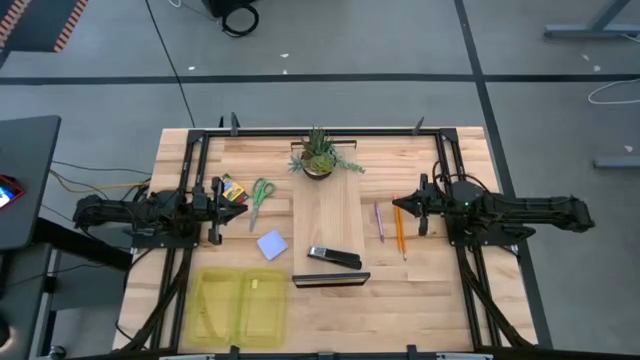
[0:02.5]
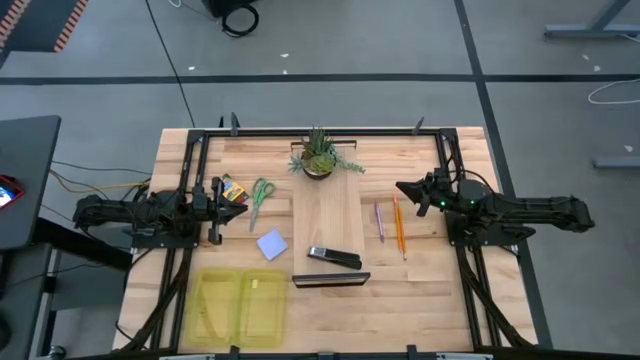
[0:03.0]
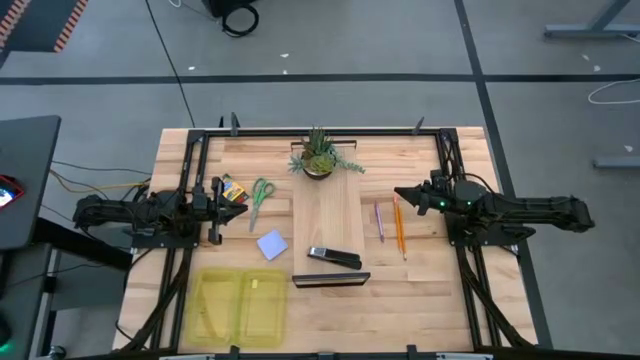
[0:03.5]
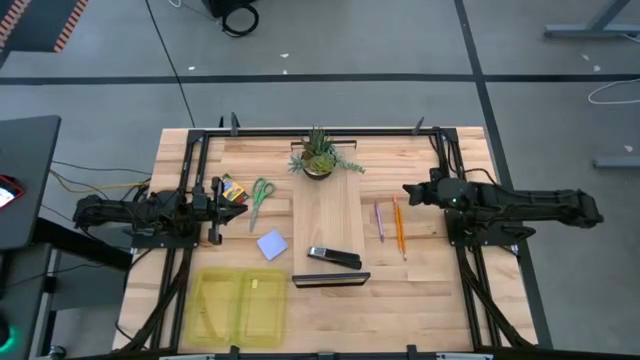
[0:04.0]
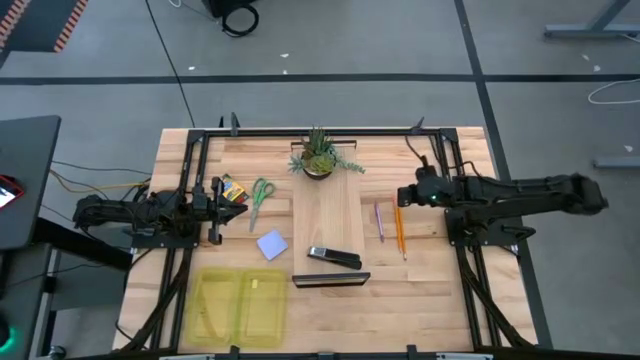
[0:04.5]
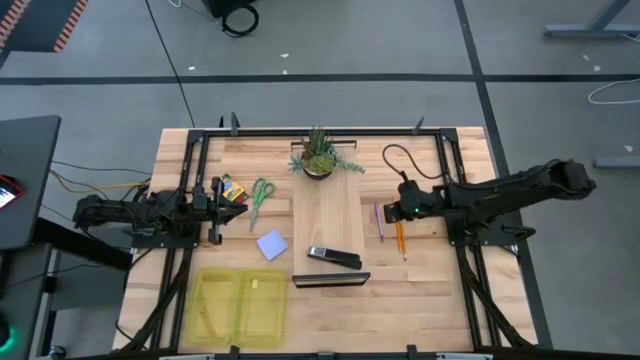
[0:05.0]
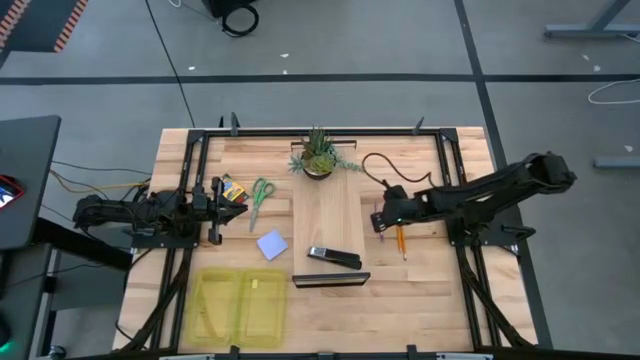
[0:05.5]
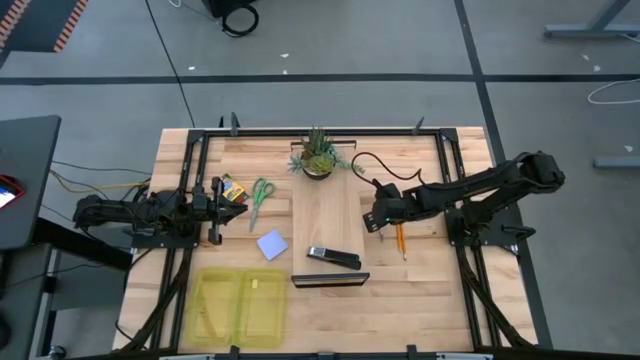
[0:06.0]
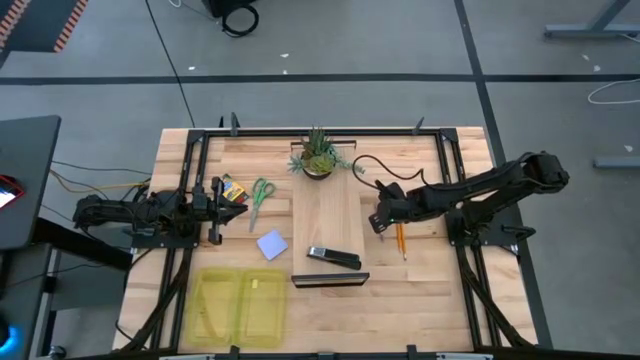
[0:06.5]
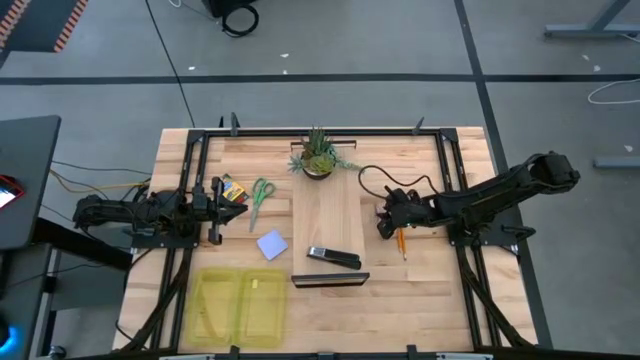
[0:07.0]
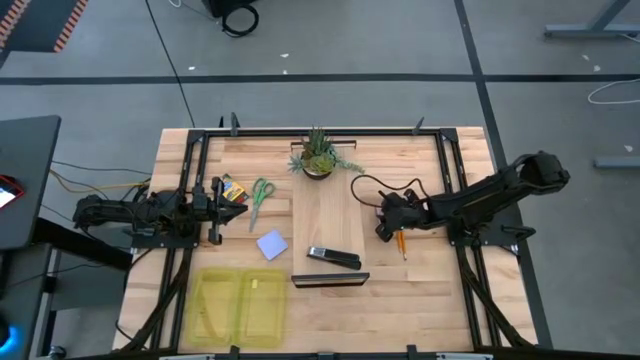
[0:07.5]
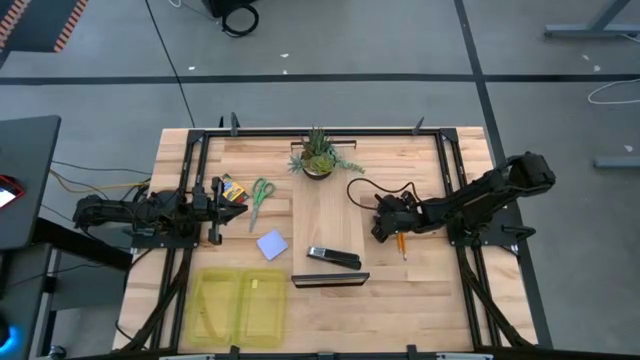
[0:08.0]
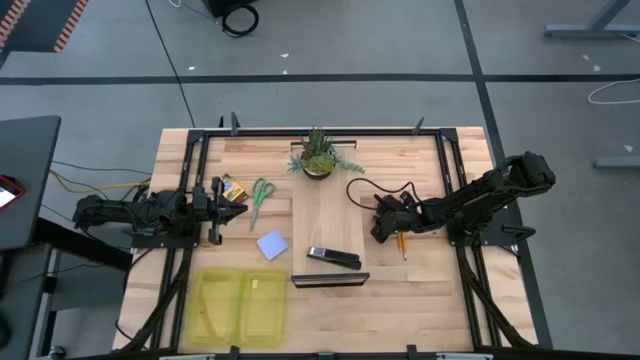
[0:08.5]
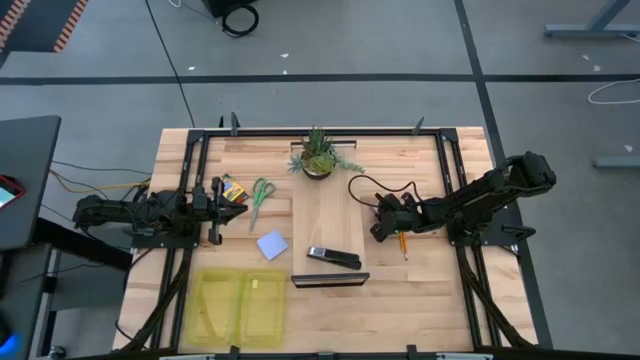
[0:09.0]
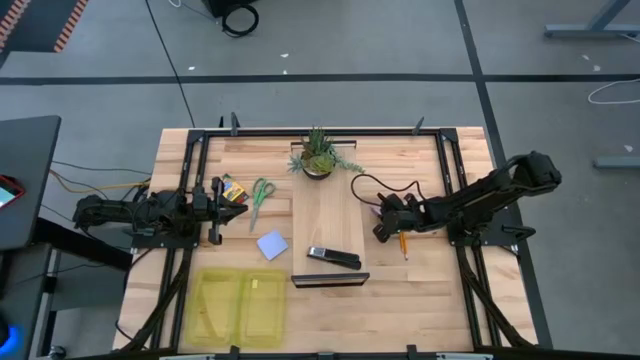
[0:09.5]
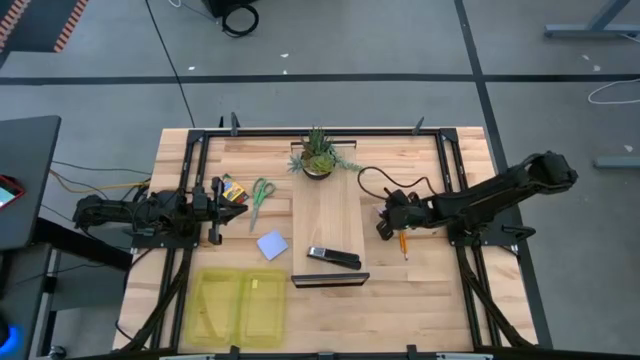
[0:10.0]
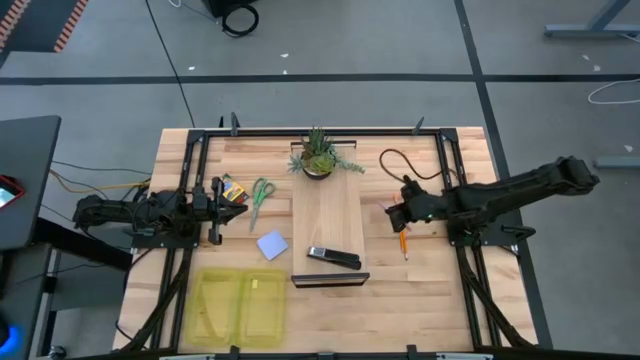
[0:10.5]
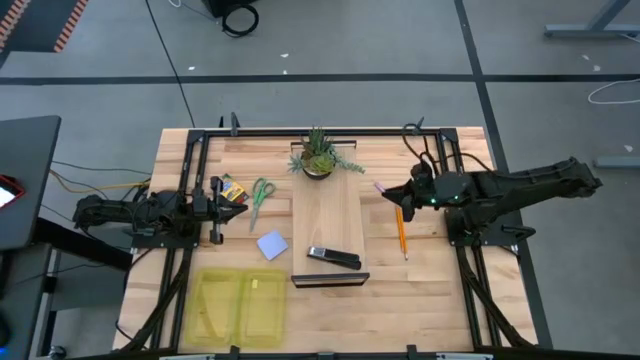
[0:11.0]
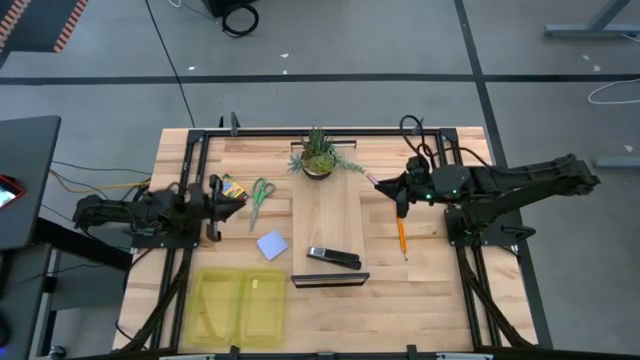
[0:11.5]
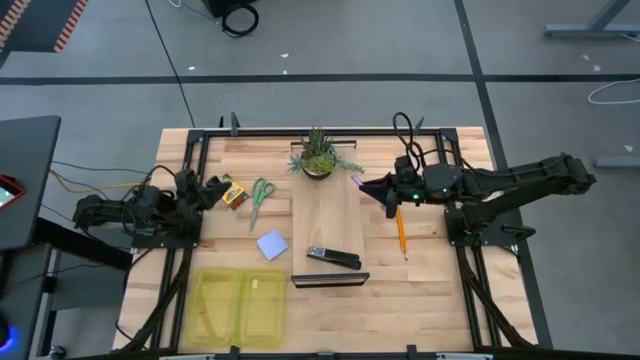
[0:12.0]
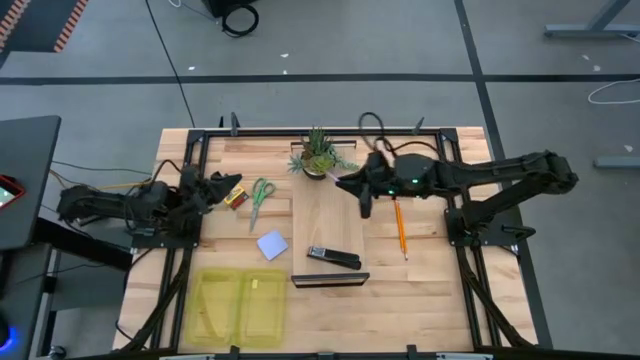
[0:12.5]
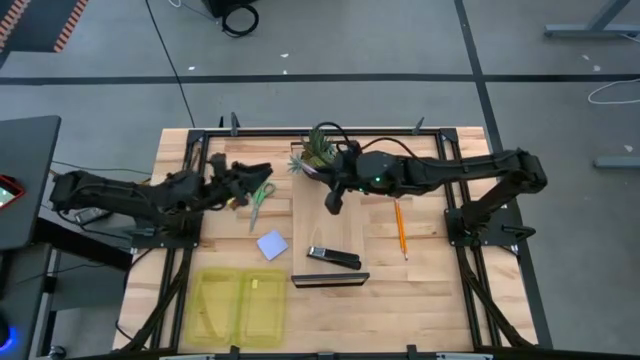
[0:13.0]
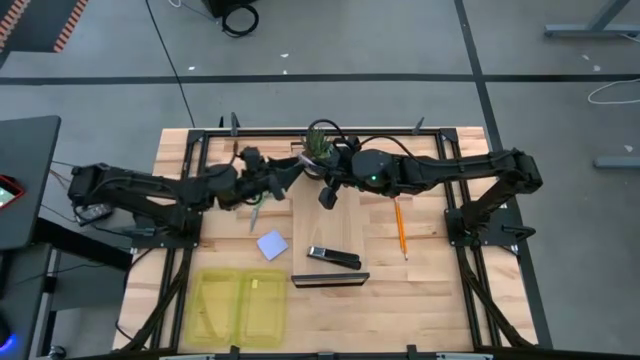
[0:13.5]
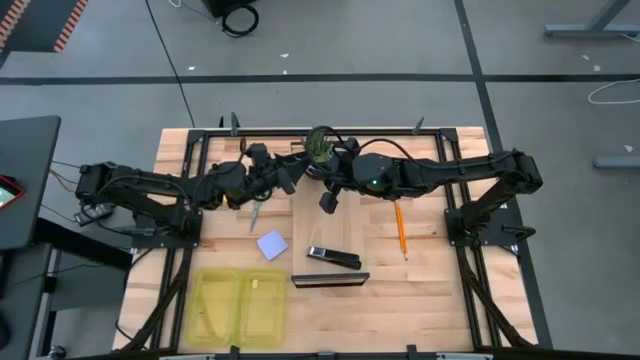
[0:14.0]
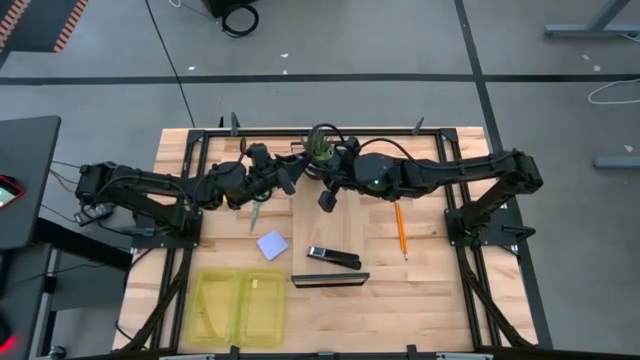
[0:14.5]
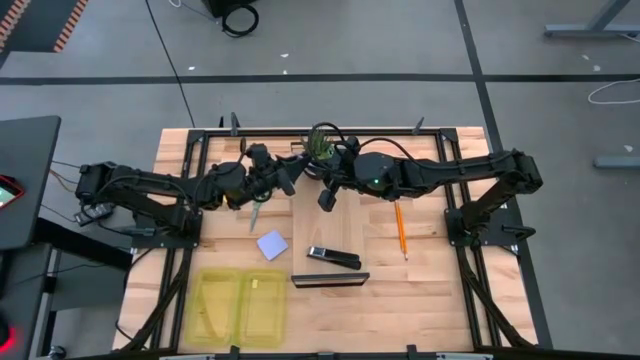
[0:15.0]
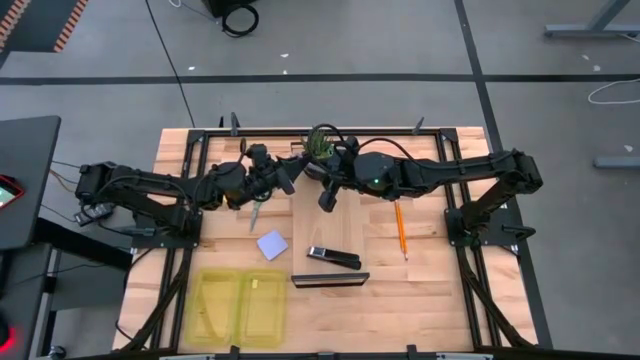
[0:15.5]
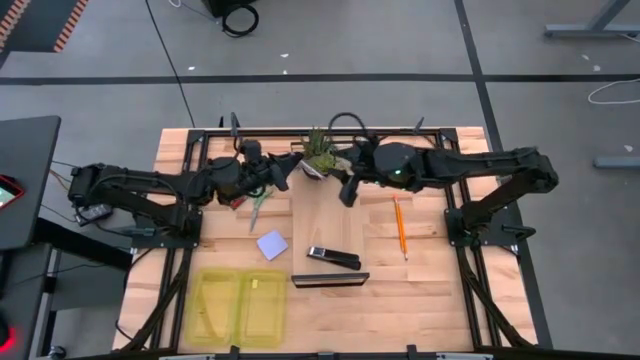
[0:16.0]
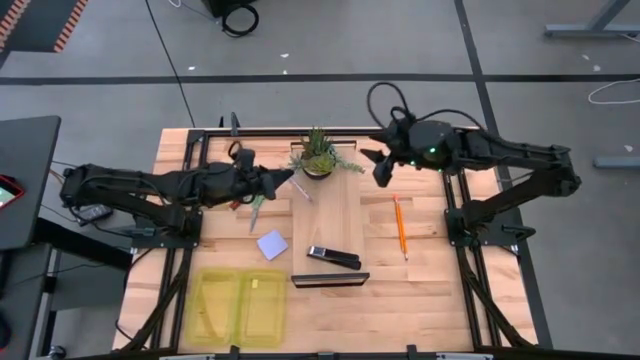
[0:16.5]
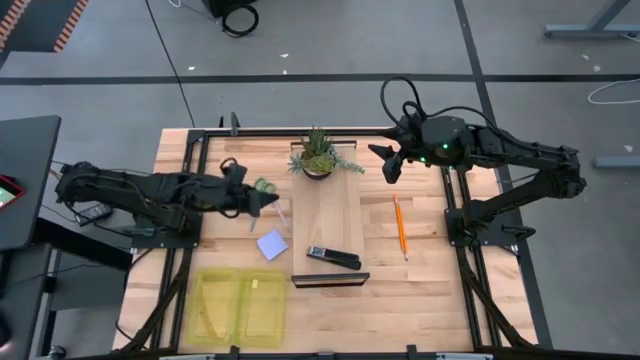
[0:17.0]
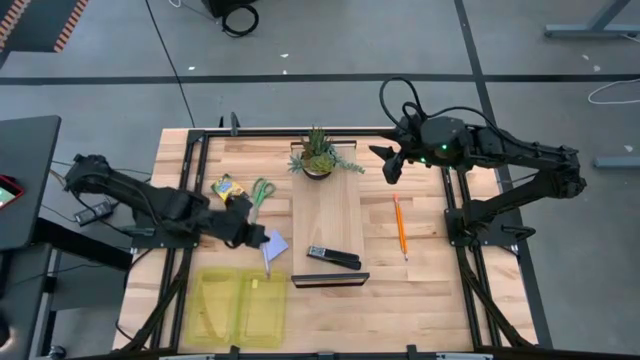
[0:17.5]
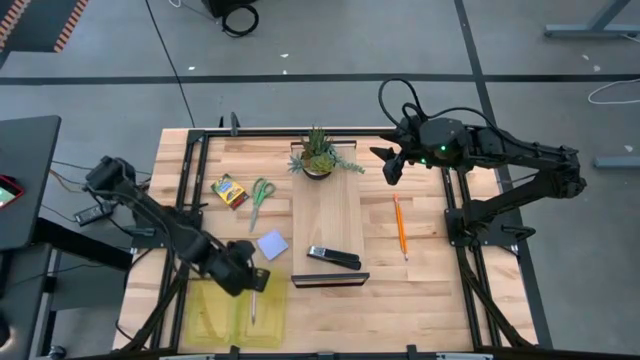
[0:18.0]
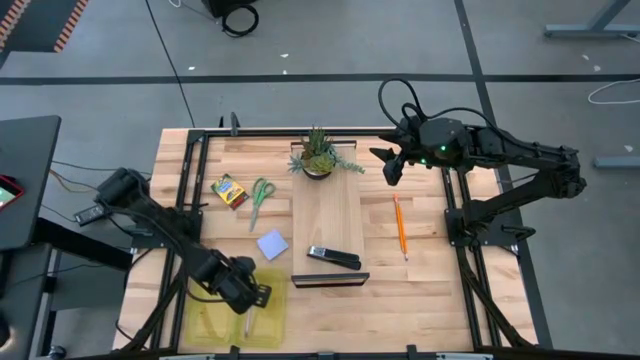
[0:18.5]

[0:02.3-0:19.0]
Task: Pack school essentials
Put the pen into the supply box

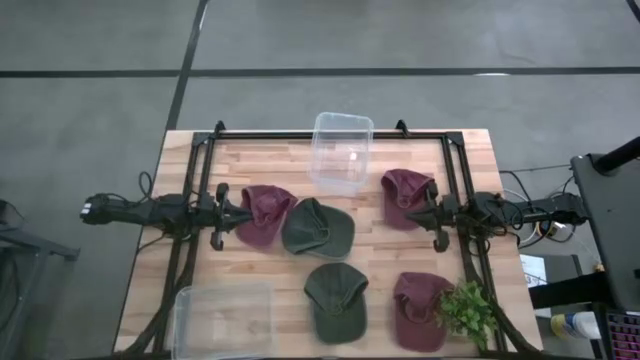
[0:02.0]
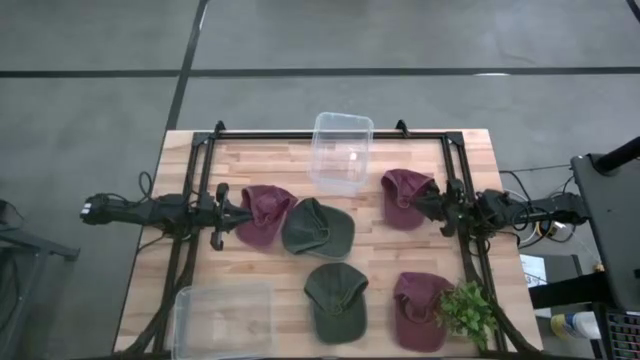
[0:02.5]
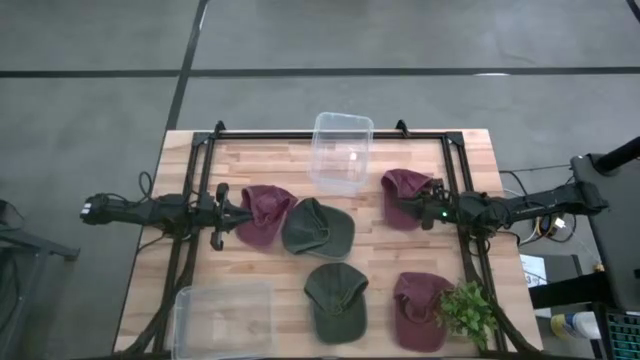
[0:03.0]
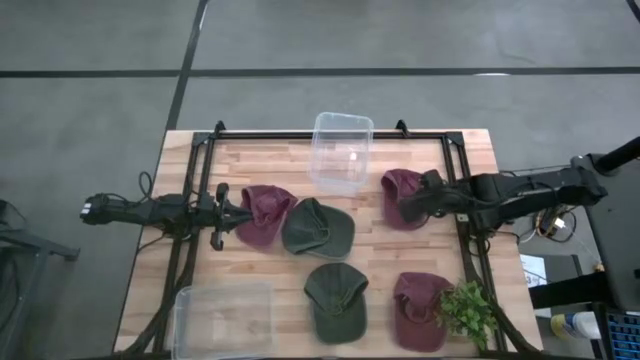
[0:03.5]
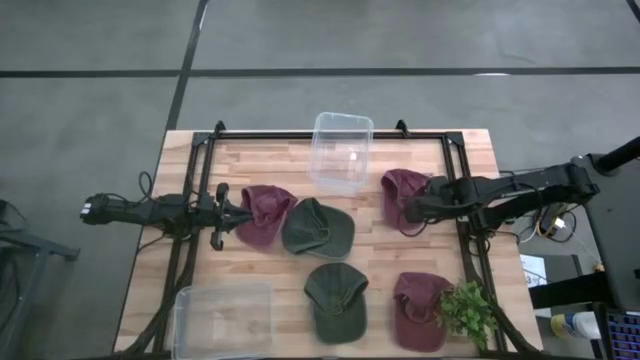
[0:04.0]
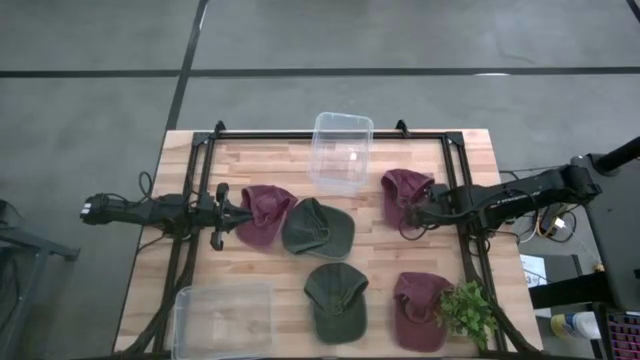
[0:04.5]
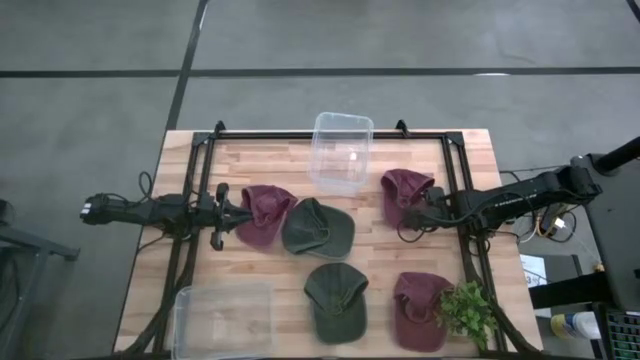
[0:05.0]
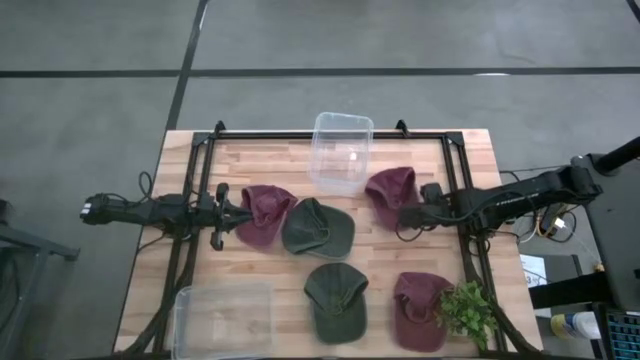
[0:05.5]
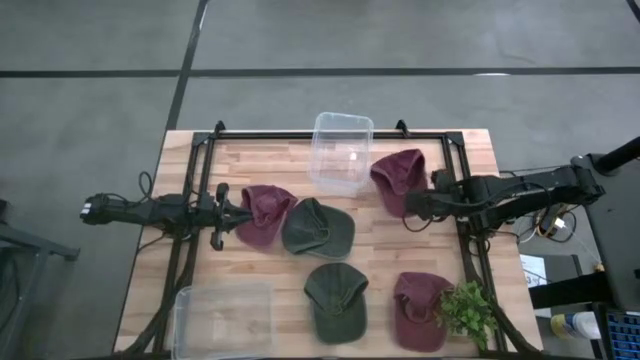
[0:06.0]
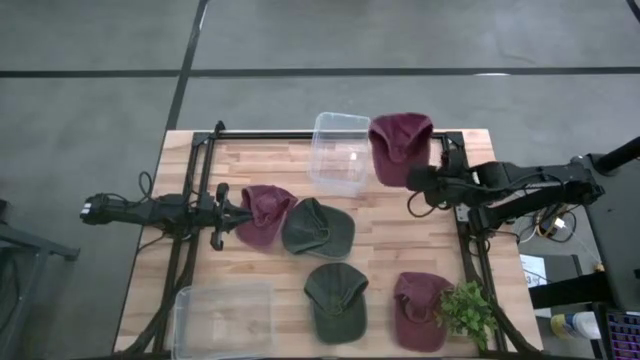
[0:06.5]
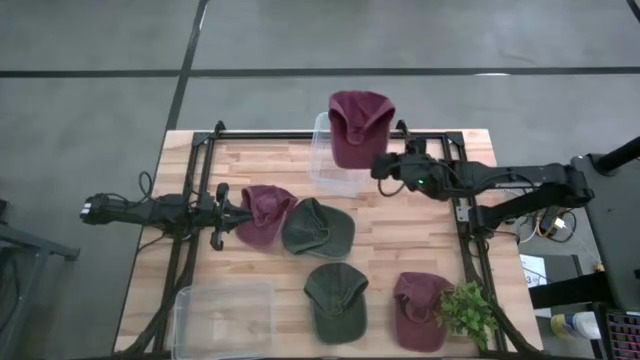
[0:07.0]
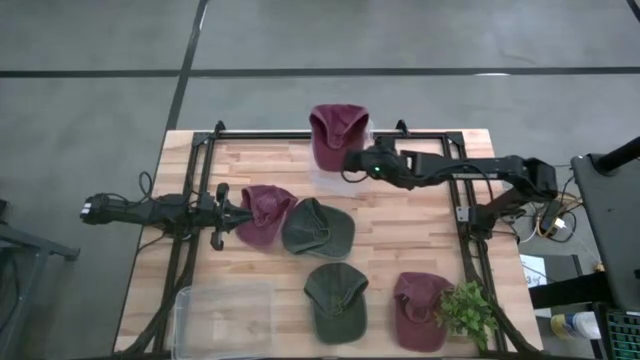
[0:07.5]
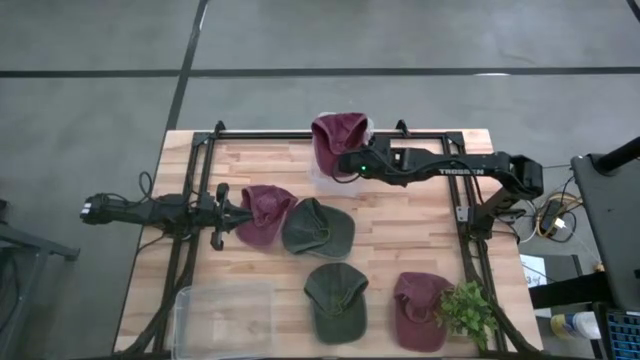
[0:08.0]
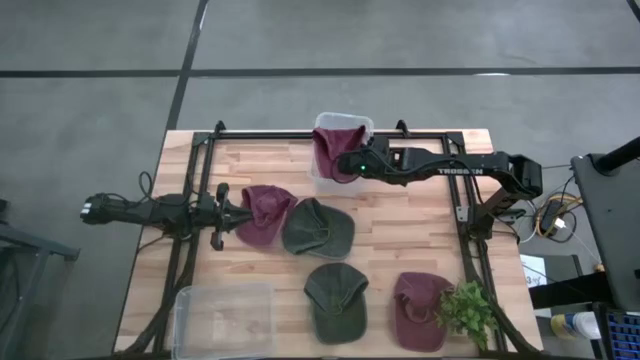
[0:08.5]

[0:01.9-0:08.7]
Task: Pick & Place hat
Put the top right red cap into the top transparent bin
